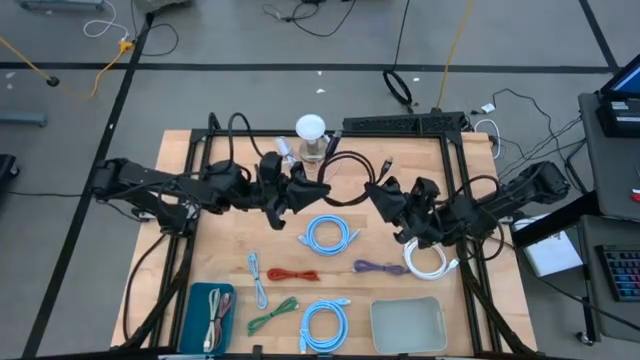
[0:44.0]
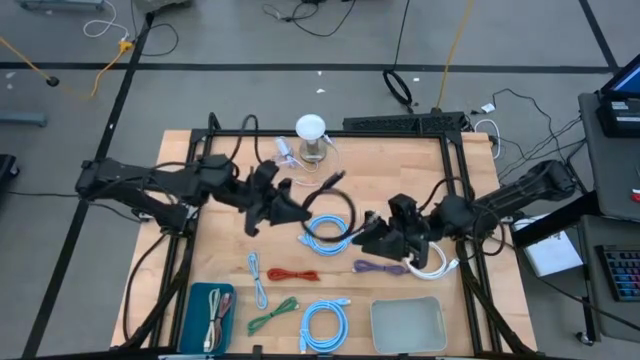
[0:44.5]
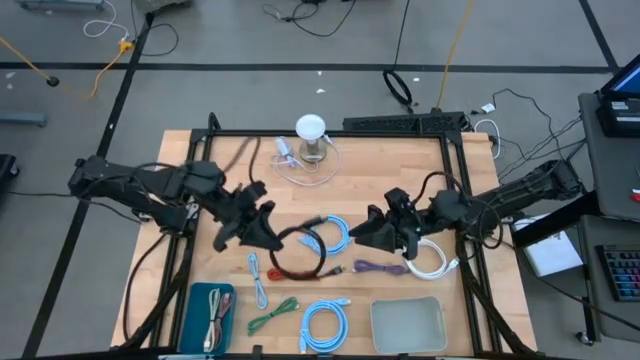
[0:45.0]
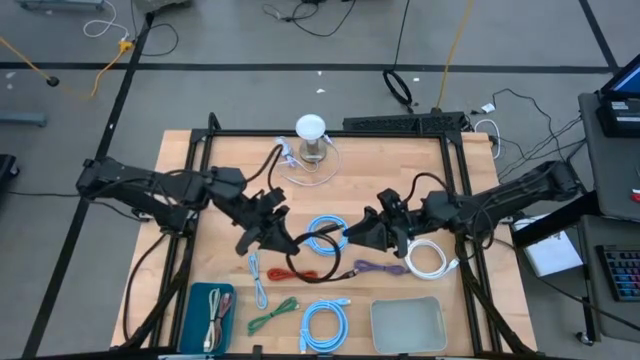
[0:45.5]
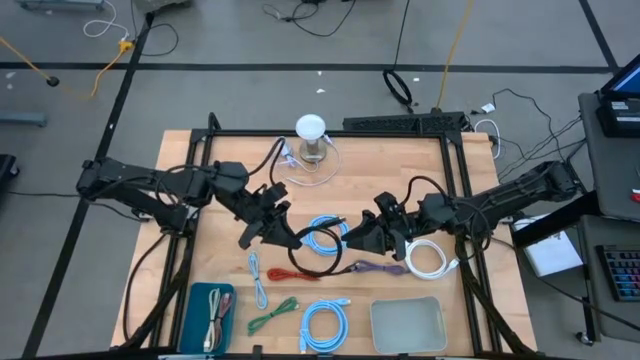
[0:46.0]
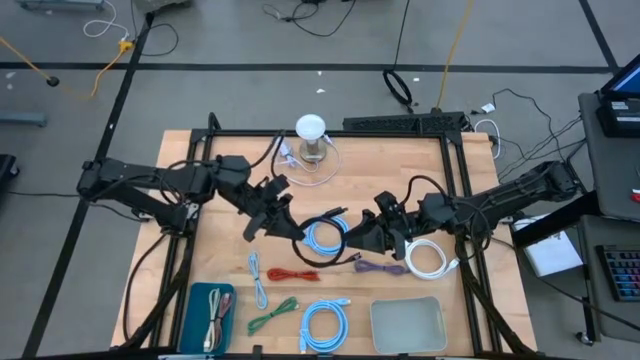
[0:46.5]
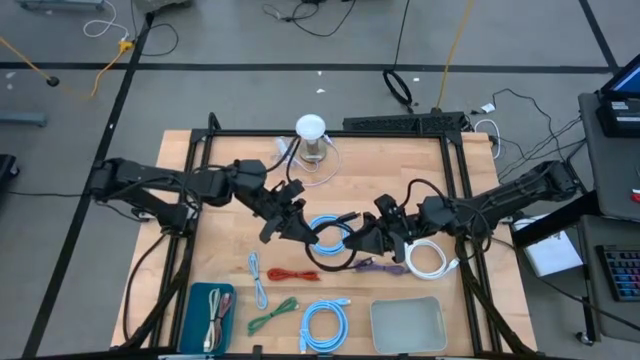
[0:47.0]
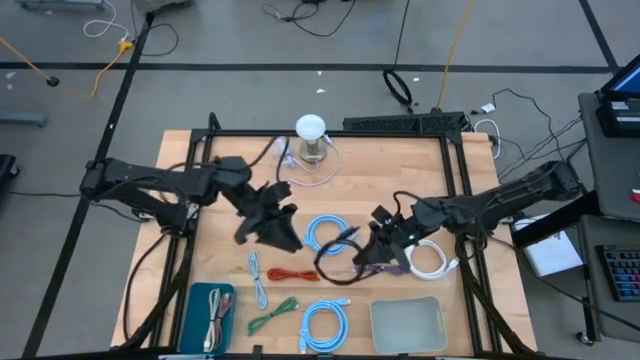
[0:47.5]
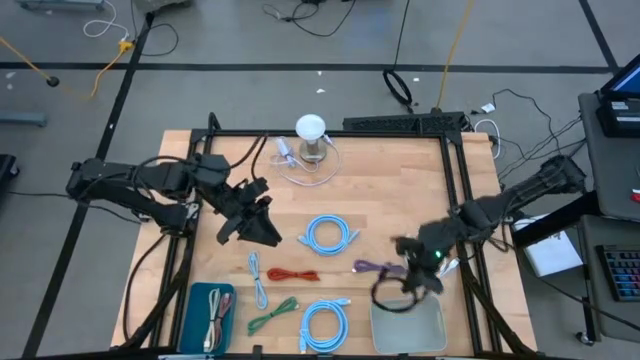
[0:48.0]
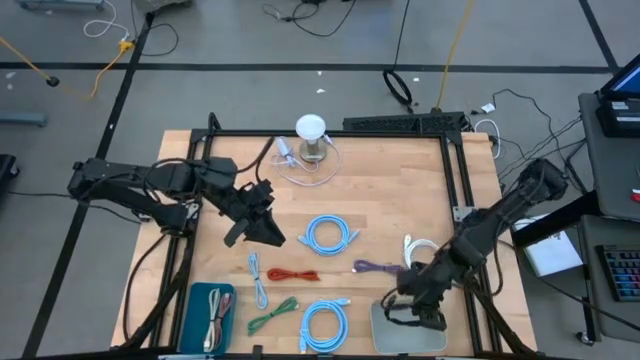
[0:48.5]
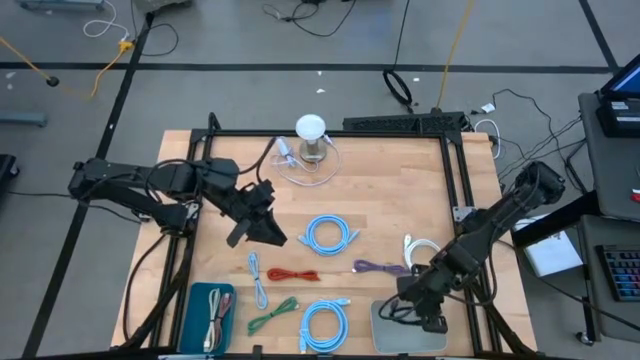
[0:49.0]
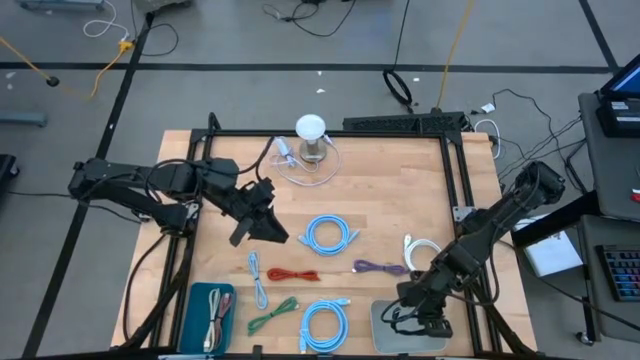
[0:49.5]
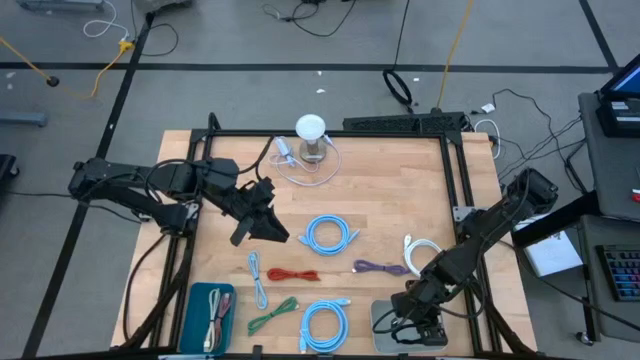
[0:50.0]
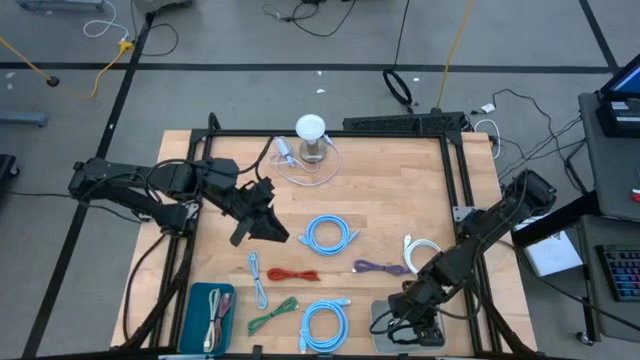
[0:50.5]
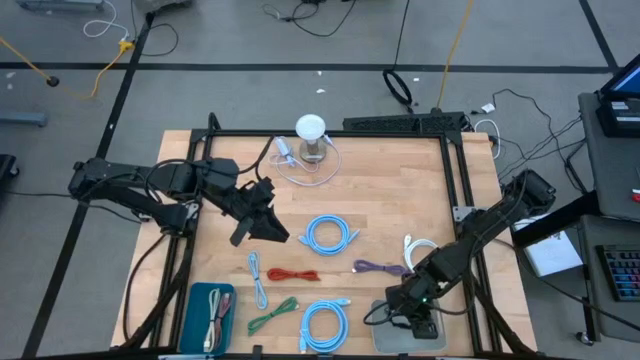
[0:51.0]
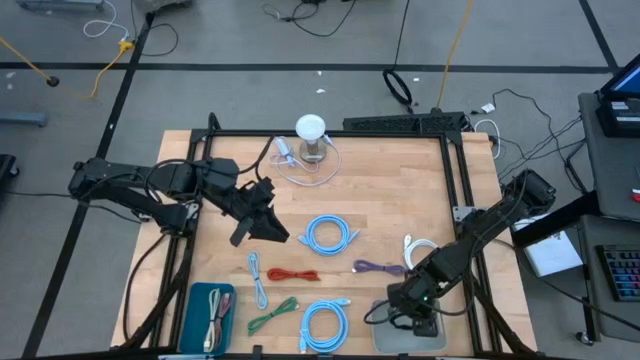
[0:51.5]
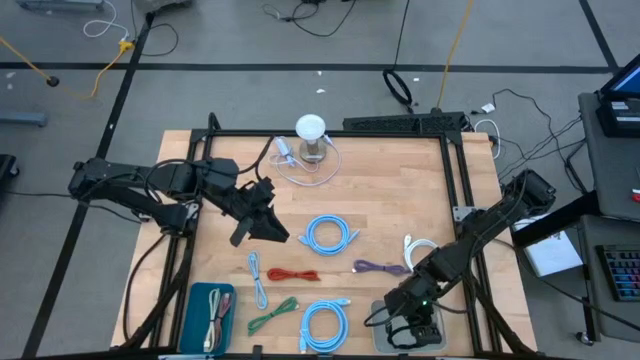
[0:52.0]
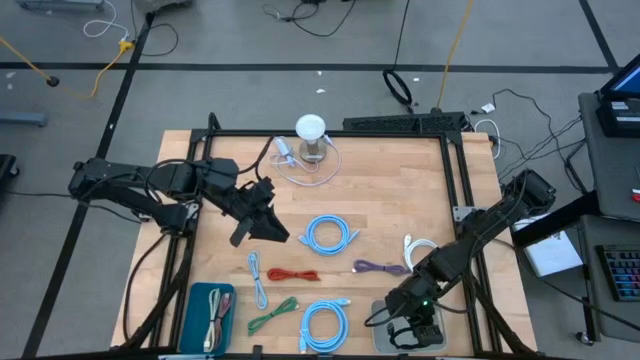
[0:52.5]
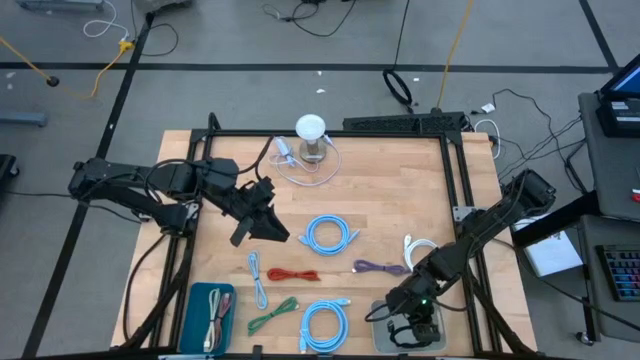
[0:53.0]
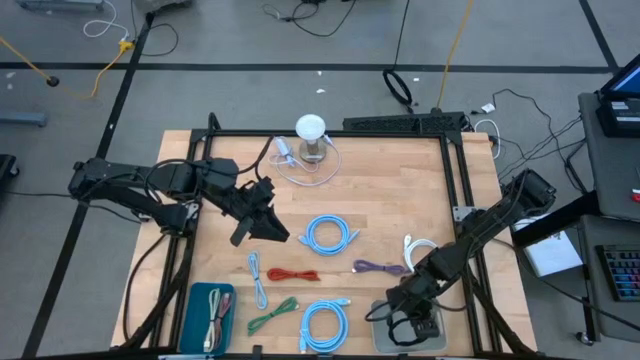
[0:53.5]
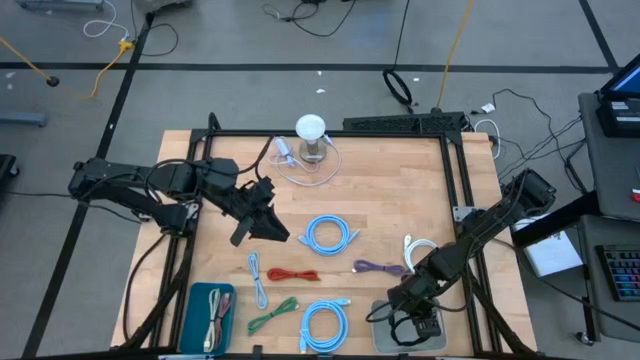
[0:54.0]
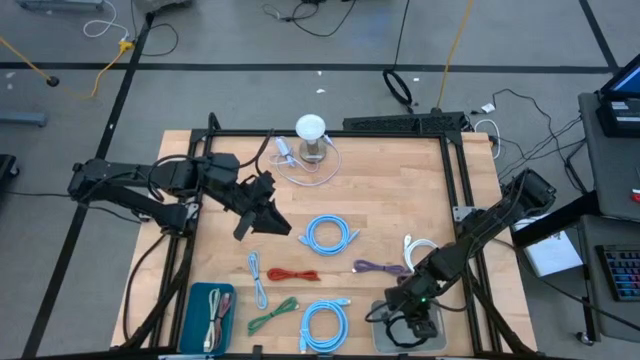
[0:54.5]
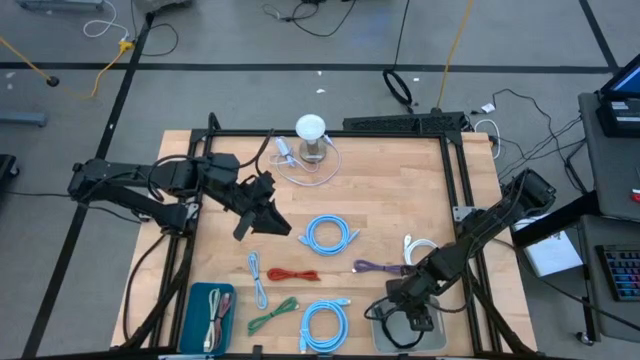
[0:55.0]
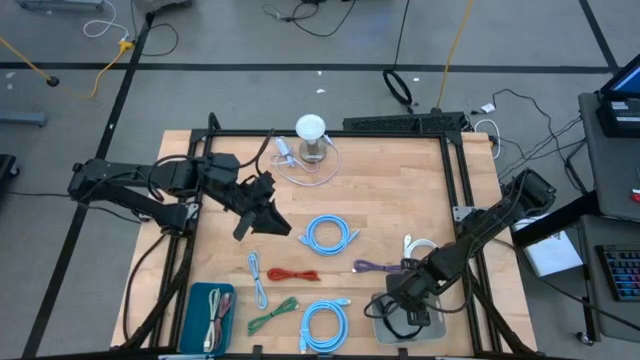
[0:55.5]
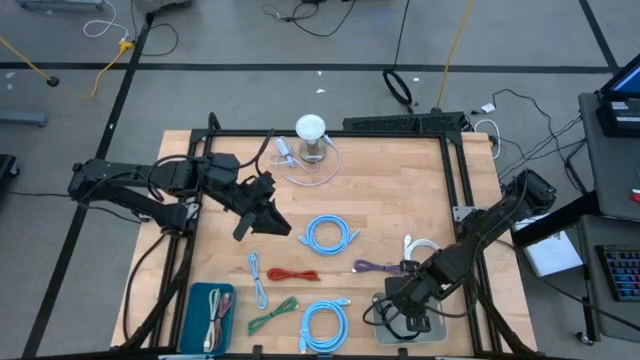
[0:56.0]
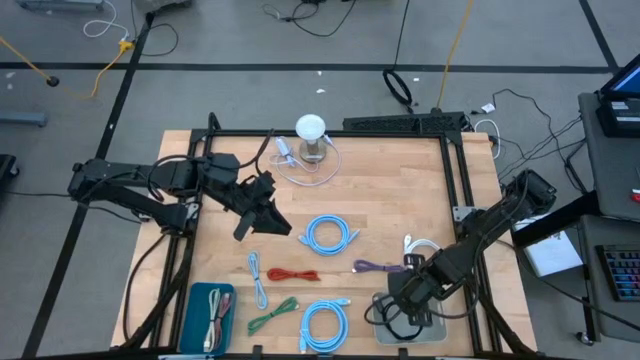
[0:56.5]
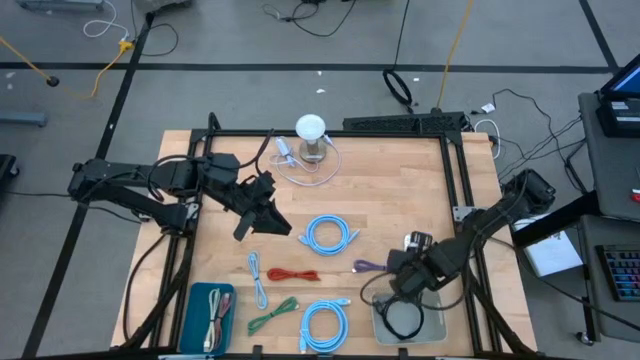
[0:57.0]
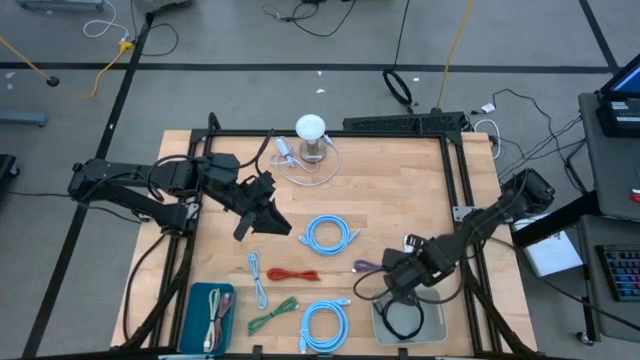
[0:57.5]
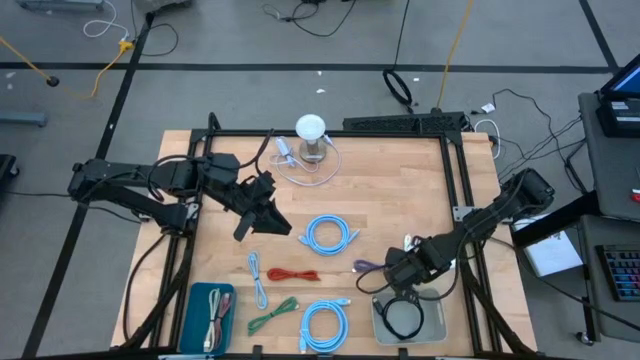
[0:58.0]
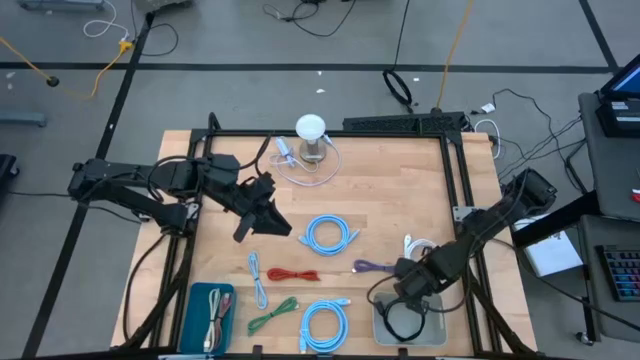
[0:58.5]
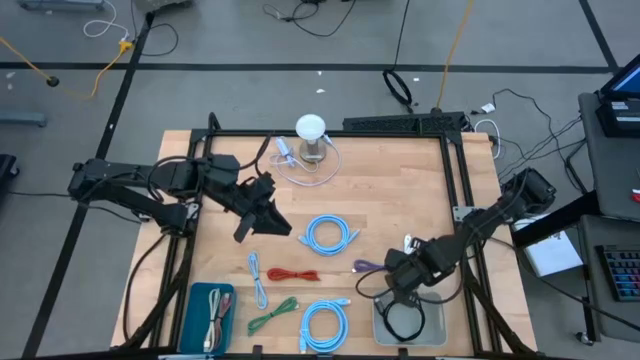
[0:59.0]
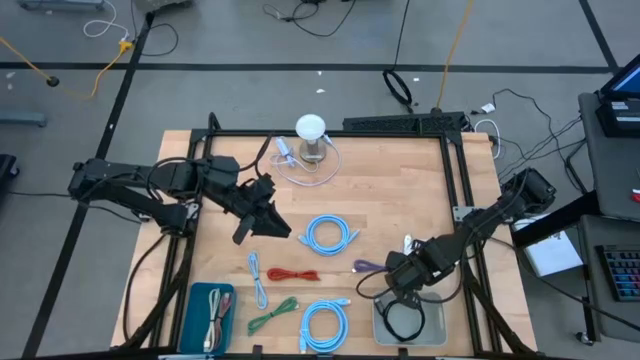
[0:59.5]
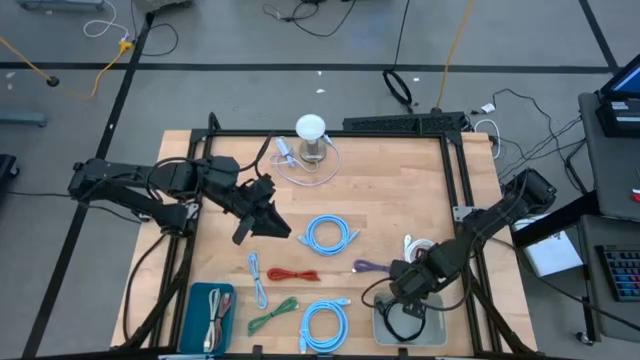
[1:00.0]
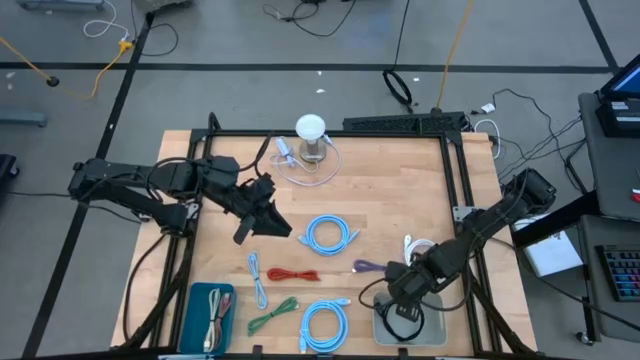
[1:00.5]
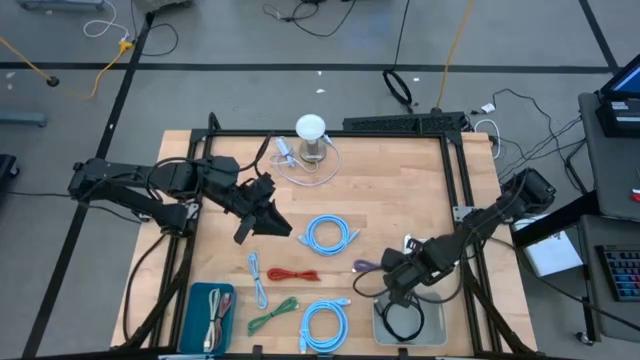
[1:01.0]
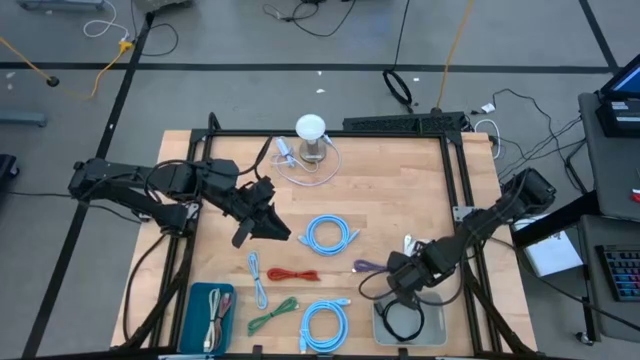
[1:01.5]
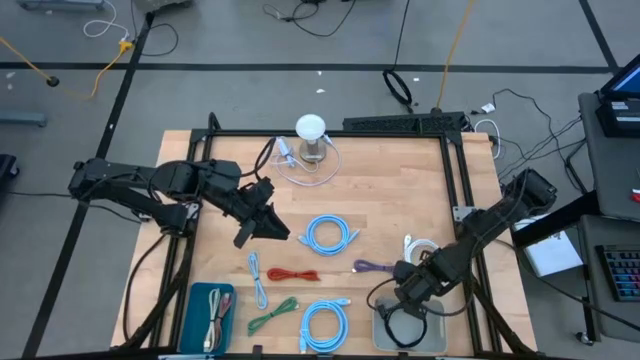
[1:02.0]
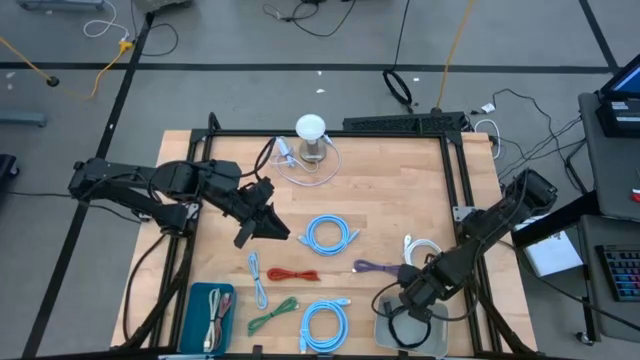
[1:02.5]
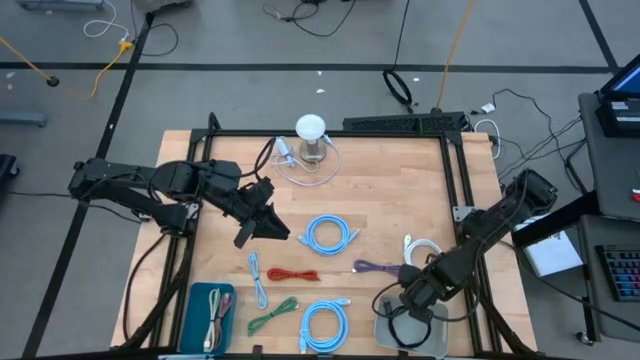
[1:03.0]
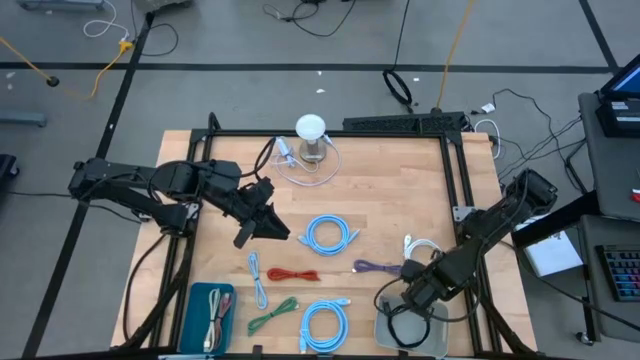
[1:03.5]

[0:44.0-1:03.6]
Task: Pick & Place USB Port
Put the black video cable into the gray bin
